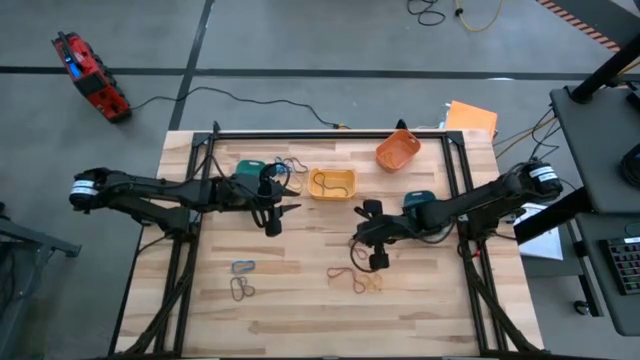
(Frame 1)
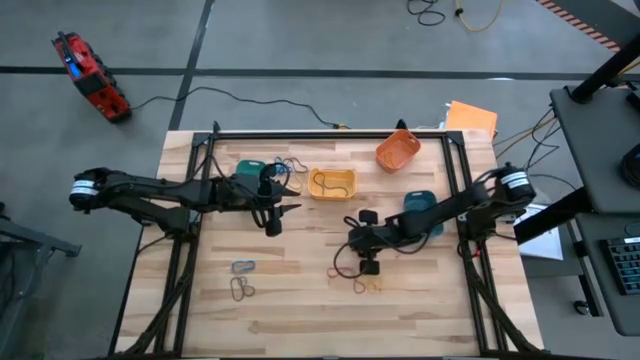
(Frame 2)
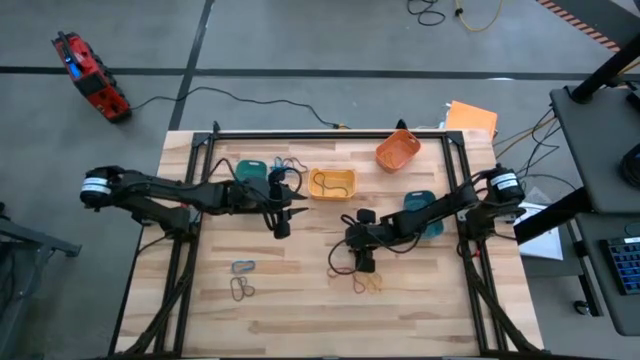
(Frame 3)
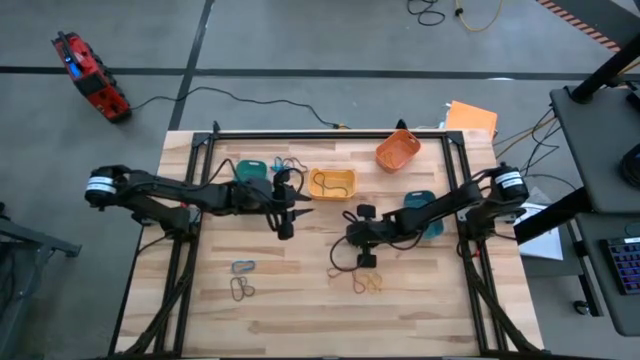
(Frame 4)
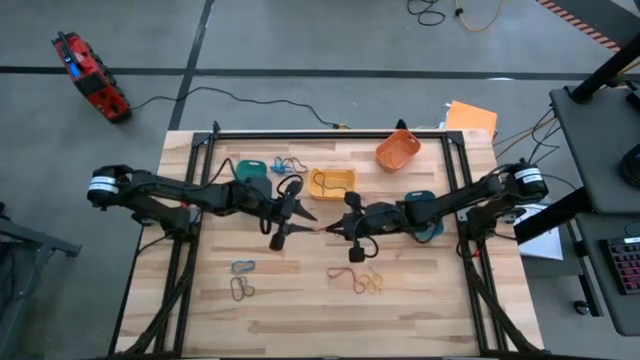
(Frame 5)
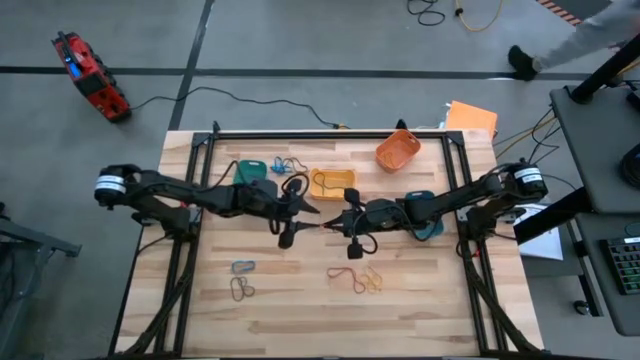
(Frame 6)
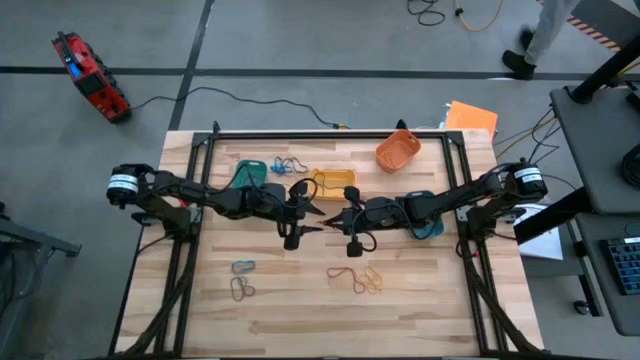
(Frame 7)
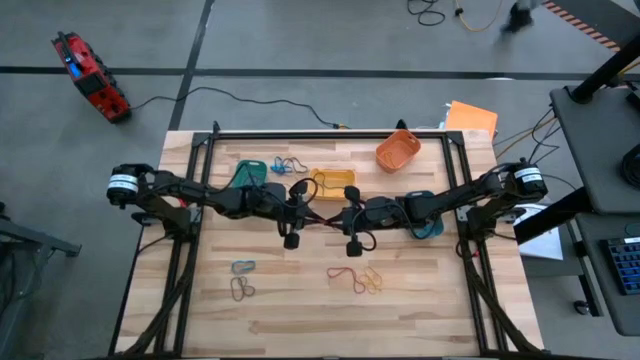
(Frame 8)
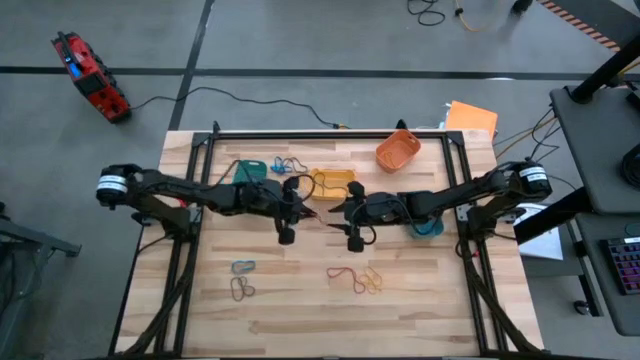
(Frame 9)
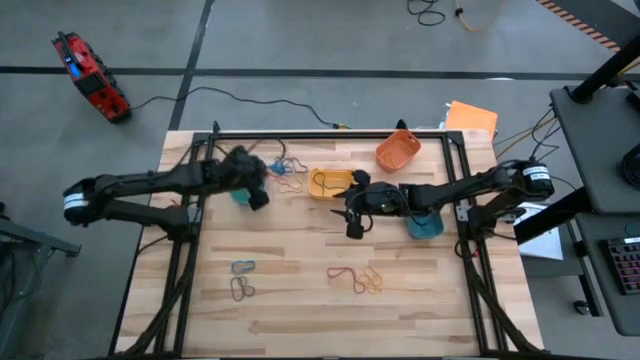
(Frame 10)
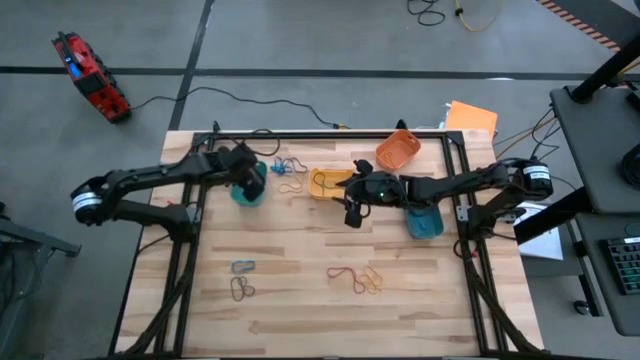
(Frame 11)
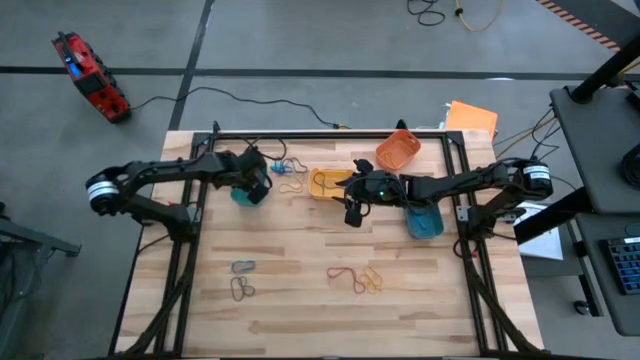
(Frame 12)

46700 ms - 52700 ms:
Task: Sort rubber bands into baskets
Put the red rubberband into the green bin

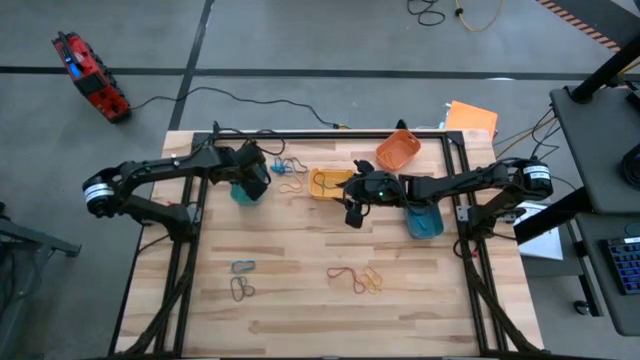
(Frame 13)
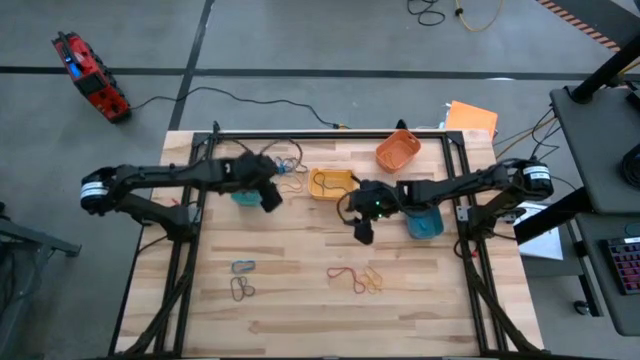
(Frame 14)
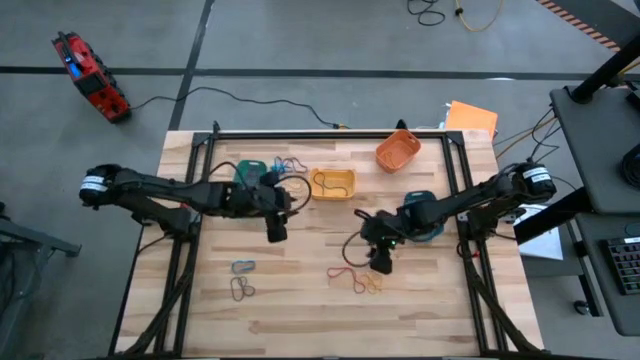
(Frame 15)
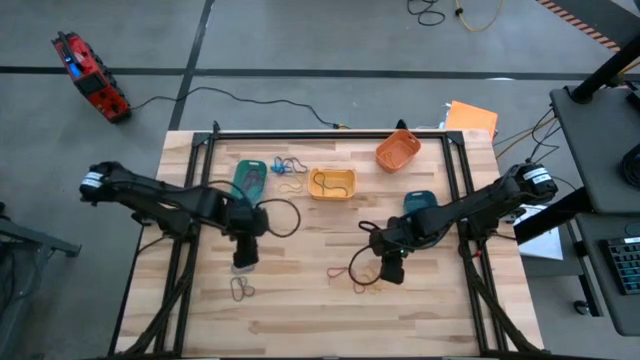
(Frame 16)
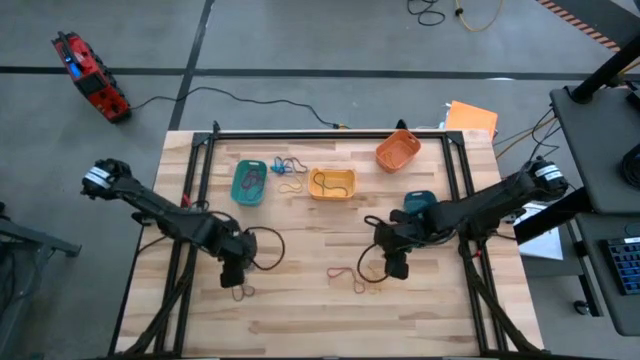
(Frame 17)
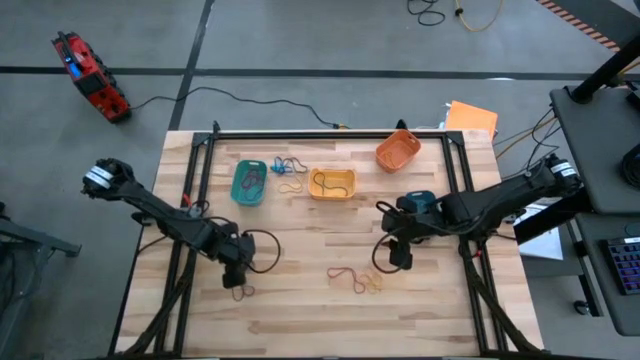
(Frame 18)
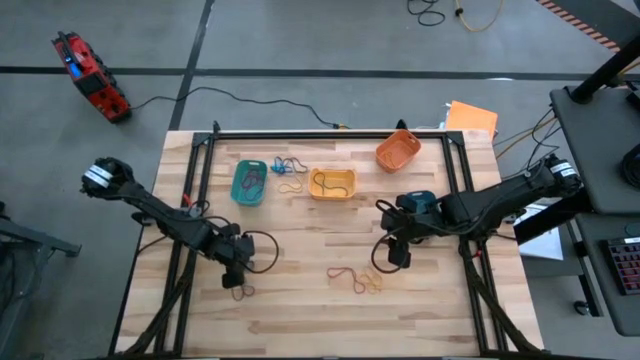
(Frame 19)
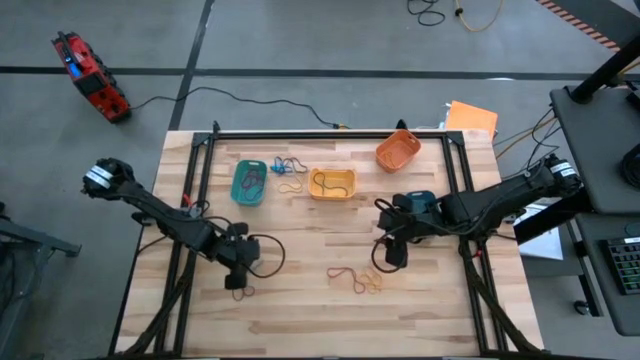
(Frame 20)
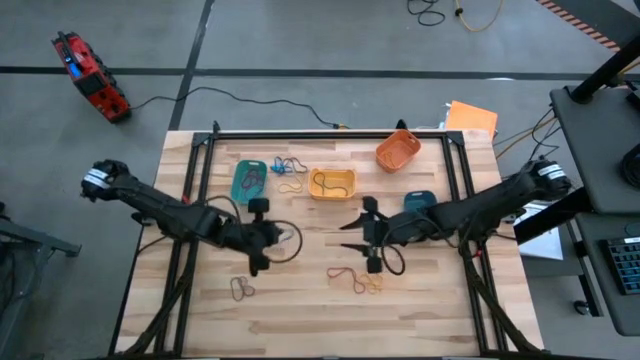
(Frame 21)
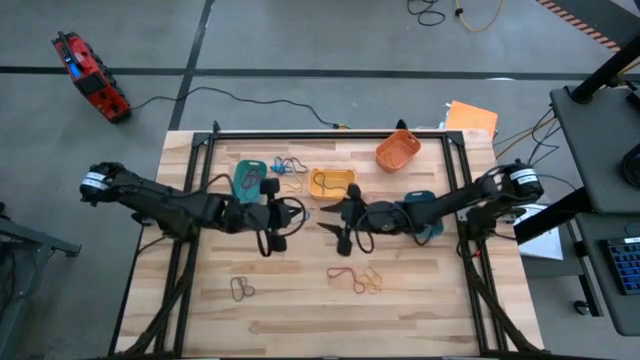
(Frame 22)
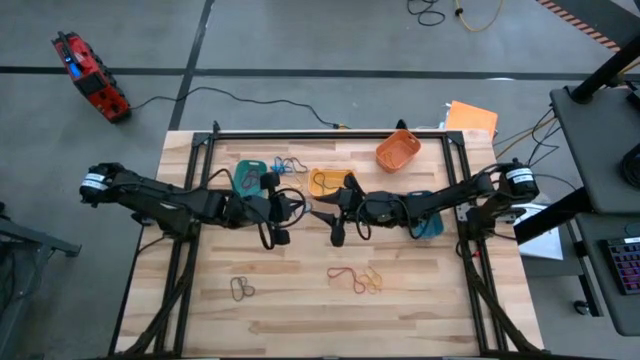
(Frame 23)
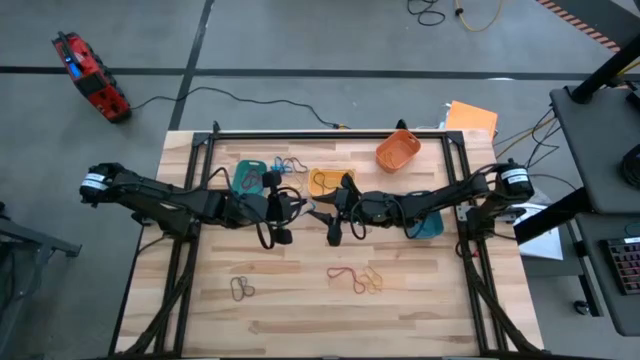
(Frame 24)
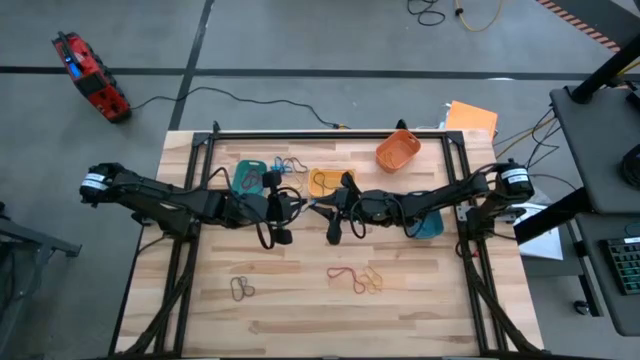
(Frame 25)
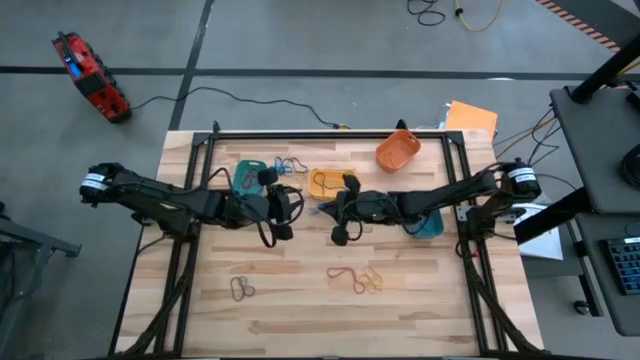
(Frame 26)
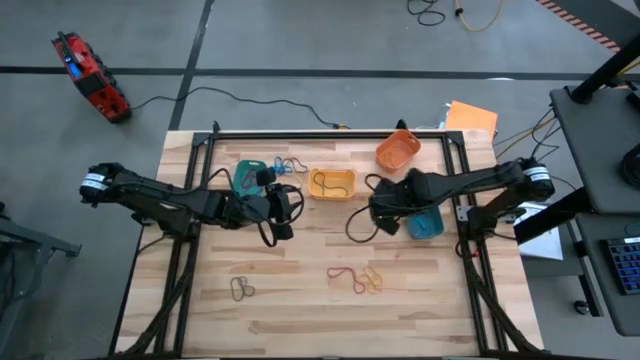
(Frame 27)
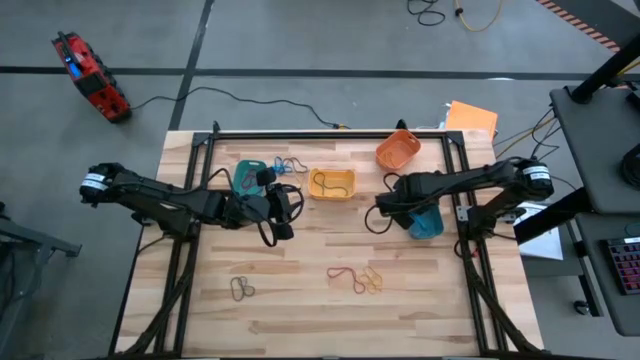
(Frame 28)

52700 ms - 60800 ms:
Put the blue rubberband into the blue bin

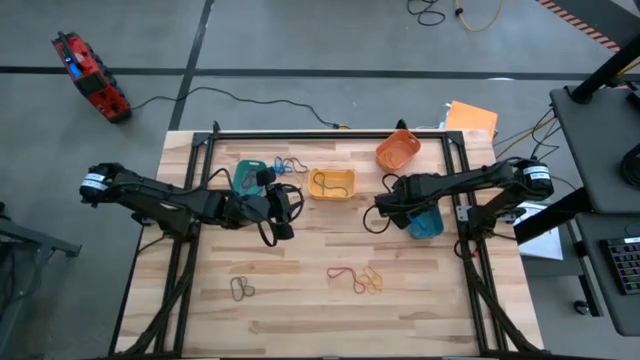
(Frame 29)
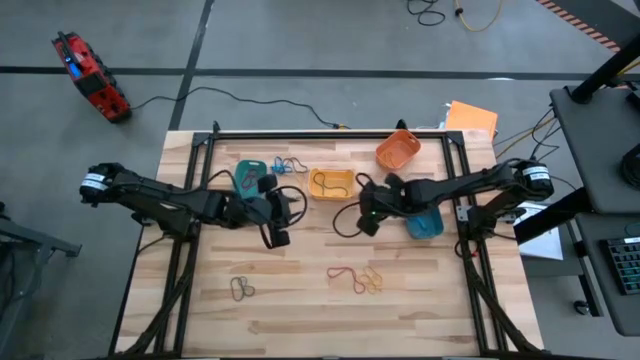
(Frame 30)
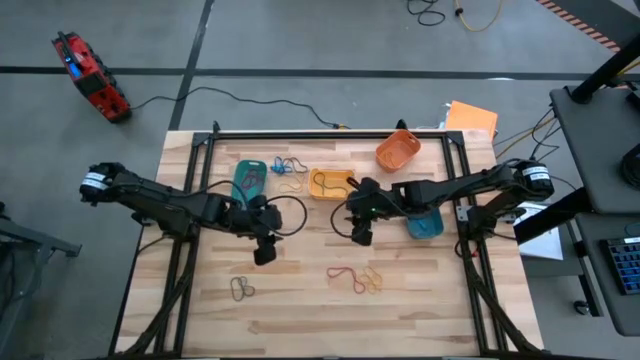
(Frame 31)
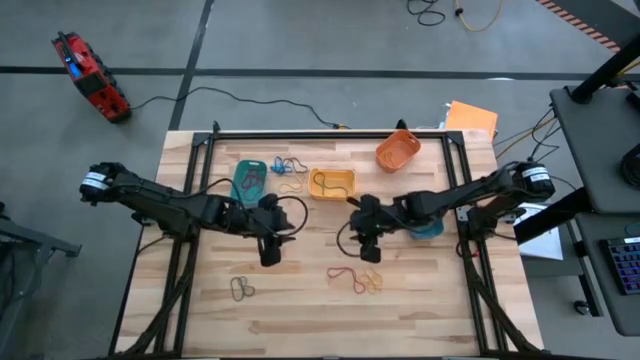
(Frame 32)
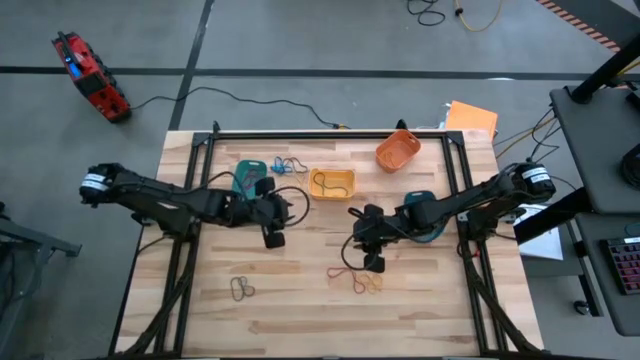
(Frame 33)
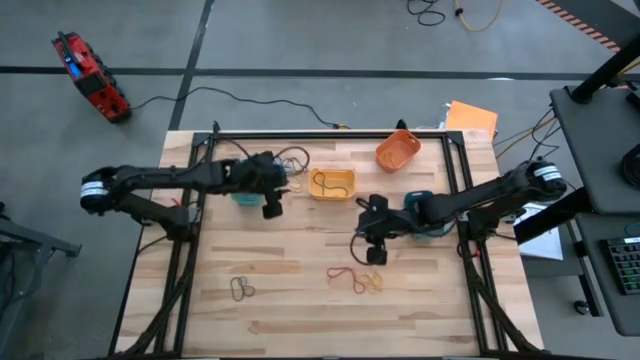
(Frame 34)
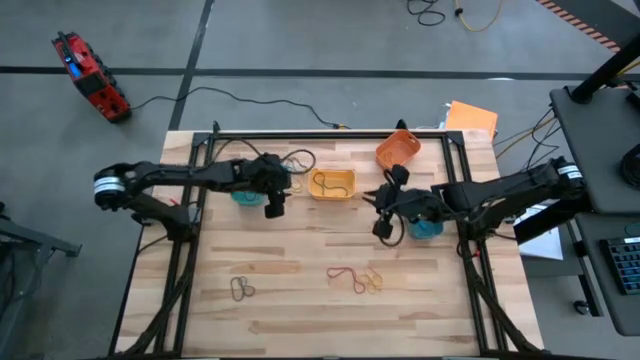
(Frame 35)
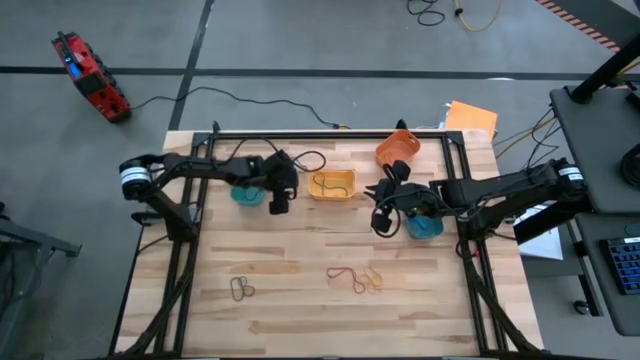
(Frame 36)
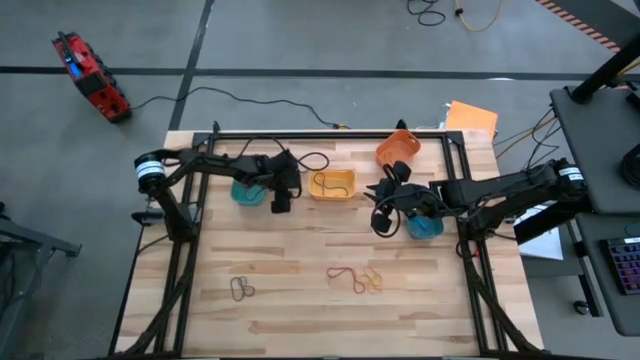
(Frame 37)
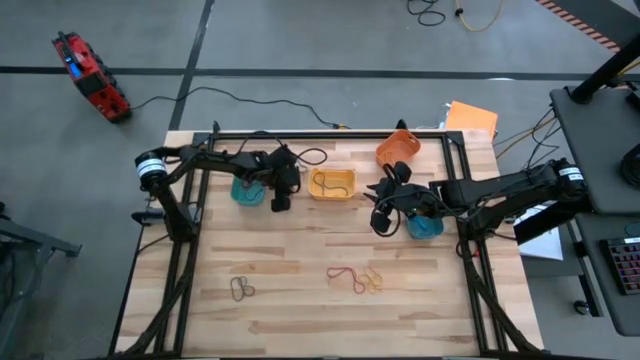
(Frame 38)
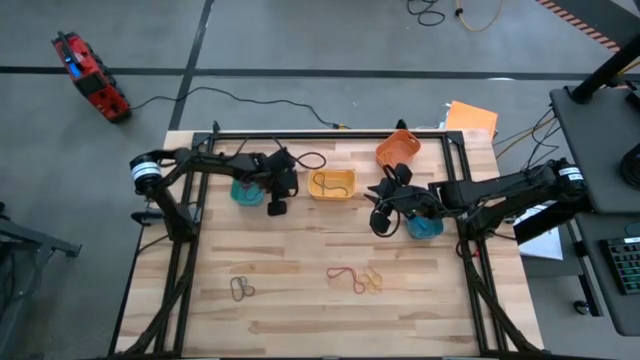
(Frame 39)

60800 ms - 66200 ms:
Put the yellow rubberband into the orange bin

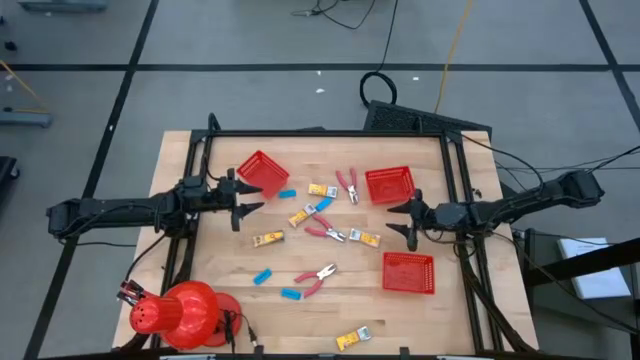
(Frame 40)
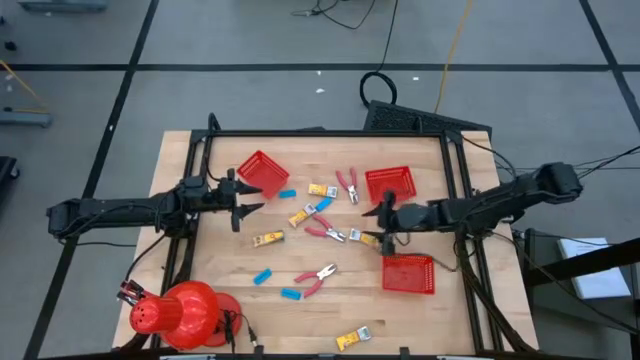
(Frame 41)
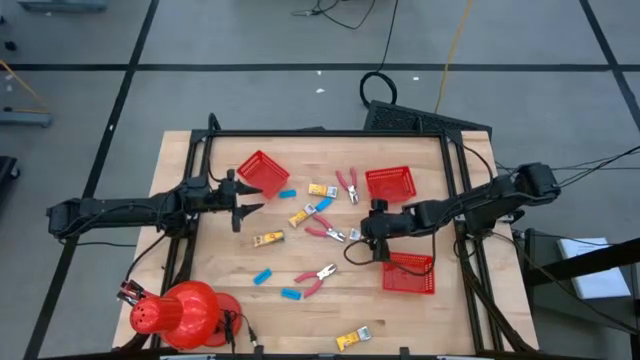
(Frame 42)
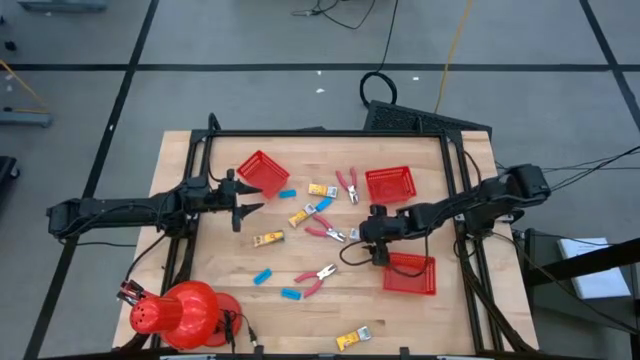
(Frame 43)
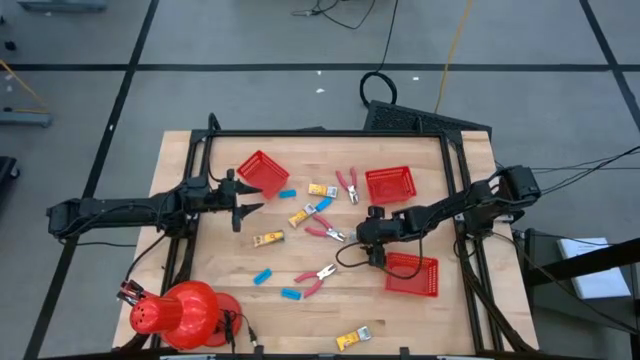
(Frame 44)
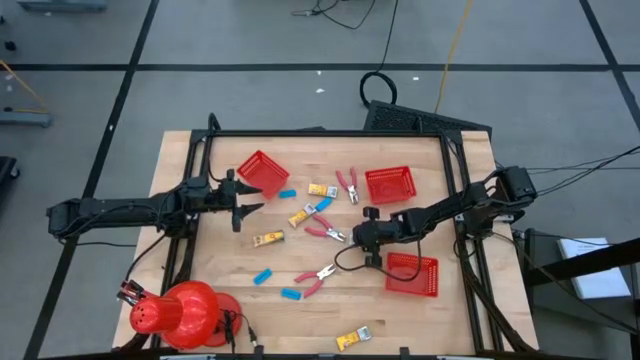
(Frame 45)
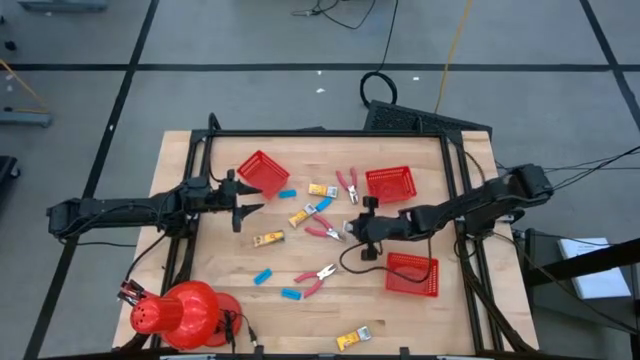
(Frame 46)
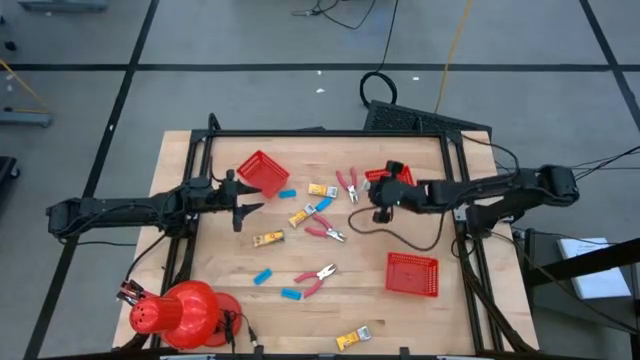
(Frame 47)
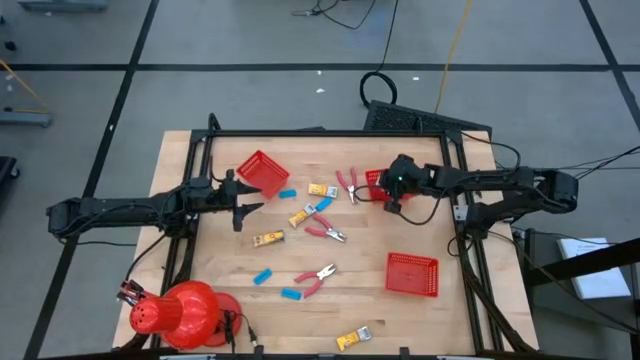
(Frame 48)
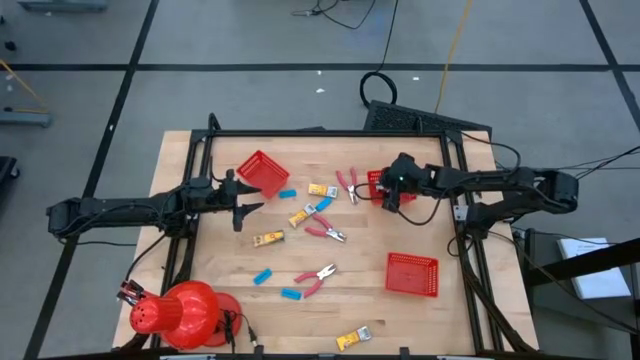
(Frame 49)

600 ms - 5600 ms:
Task: Pick & Place School Supplies
Put the yellow crayon box into the top right red bin
